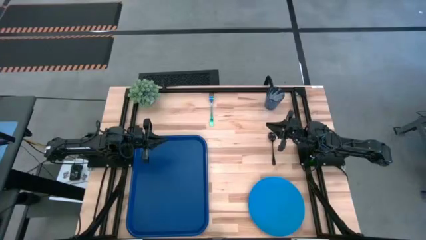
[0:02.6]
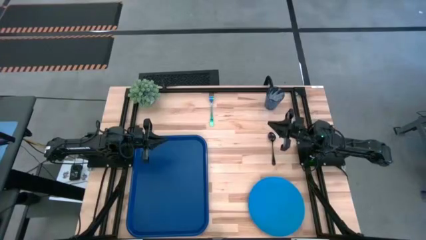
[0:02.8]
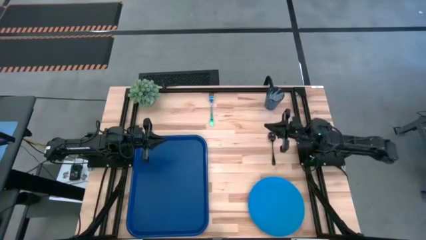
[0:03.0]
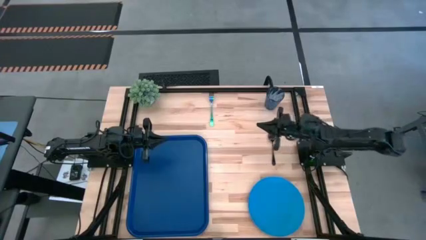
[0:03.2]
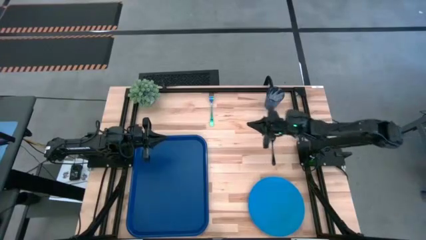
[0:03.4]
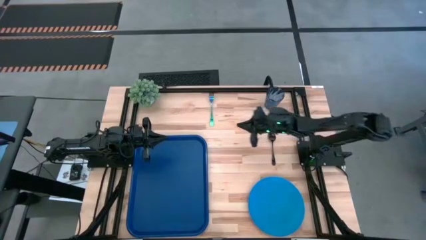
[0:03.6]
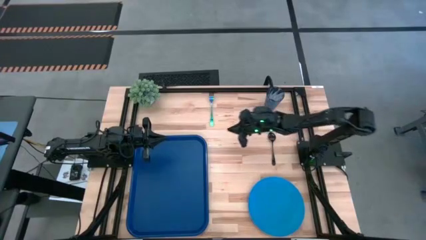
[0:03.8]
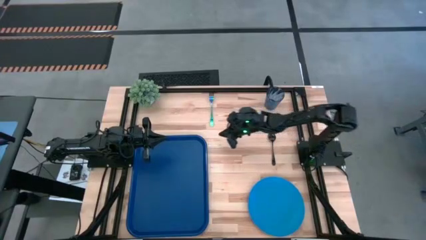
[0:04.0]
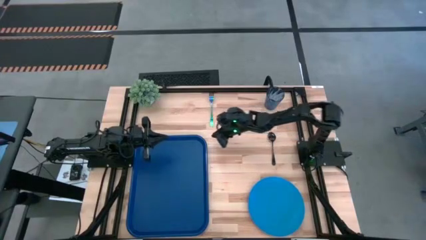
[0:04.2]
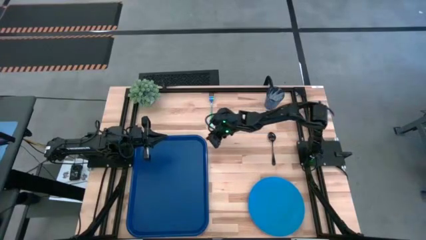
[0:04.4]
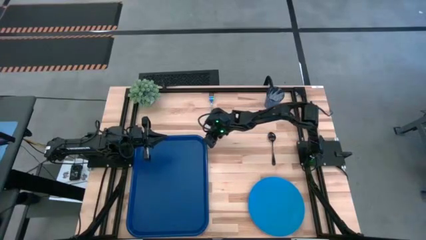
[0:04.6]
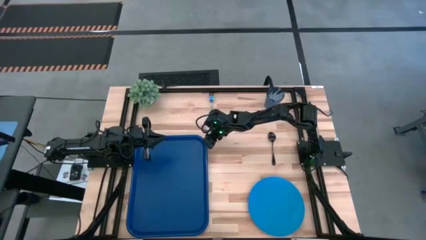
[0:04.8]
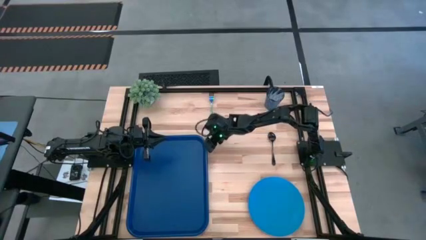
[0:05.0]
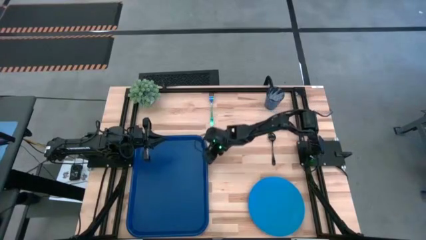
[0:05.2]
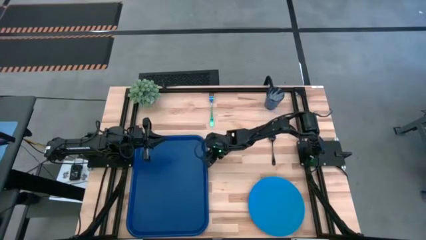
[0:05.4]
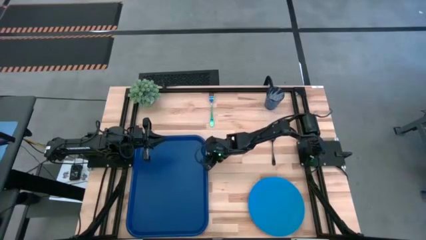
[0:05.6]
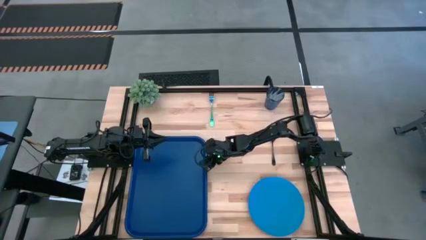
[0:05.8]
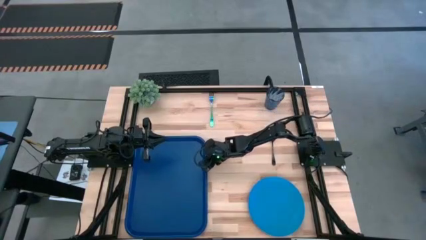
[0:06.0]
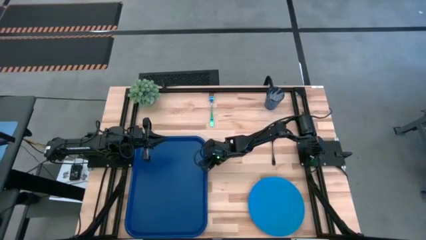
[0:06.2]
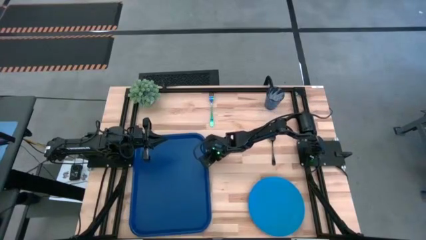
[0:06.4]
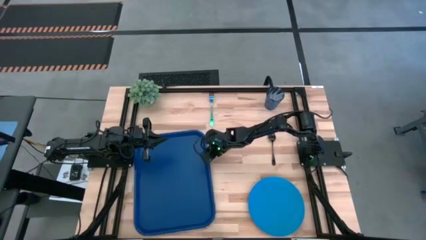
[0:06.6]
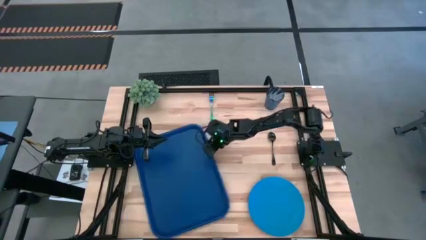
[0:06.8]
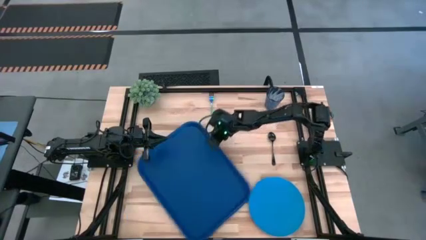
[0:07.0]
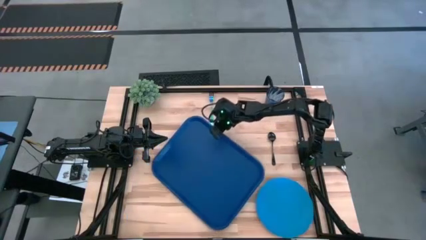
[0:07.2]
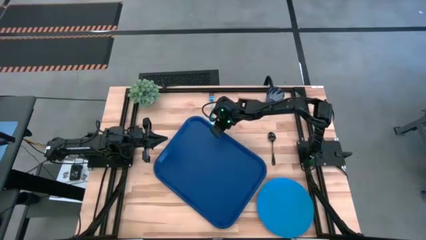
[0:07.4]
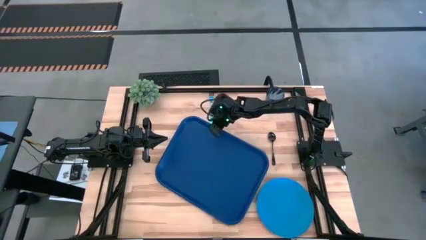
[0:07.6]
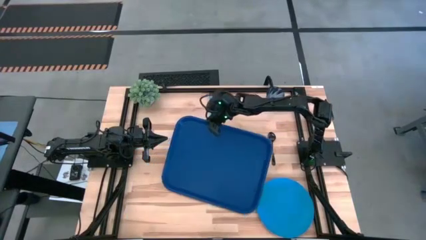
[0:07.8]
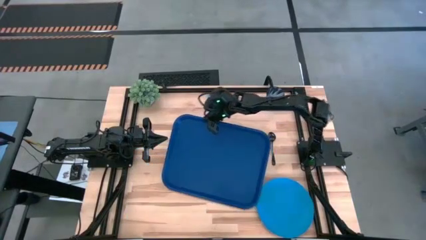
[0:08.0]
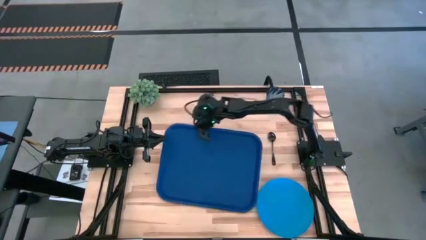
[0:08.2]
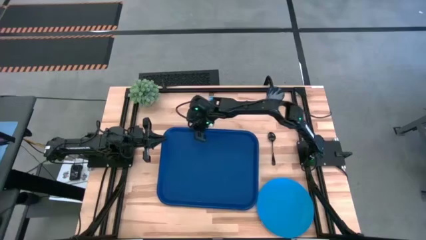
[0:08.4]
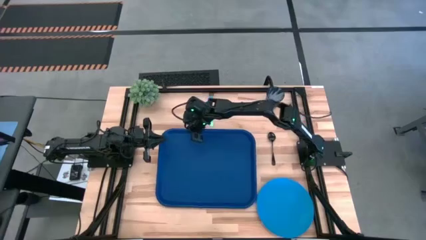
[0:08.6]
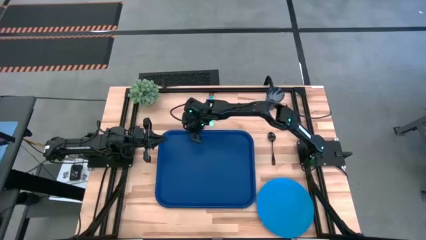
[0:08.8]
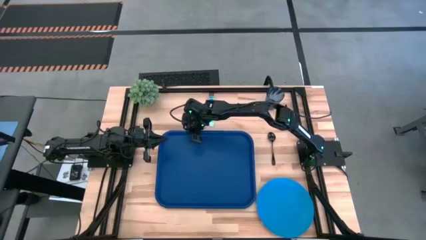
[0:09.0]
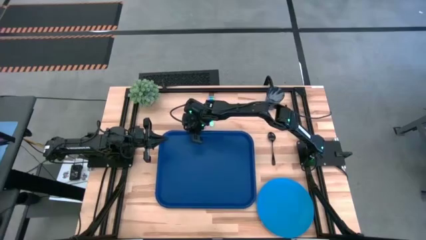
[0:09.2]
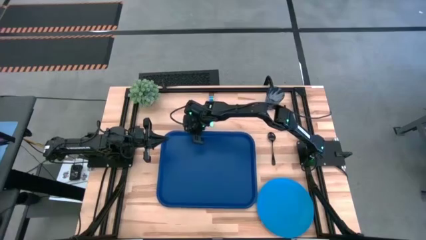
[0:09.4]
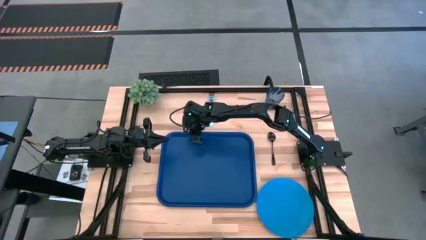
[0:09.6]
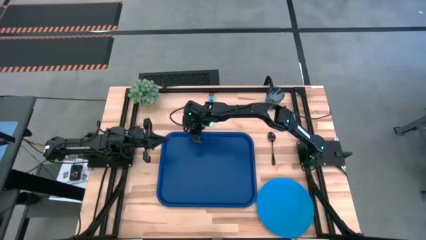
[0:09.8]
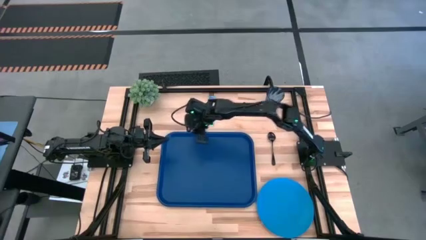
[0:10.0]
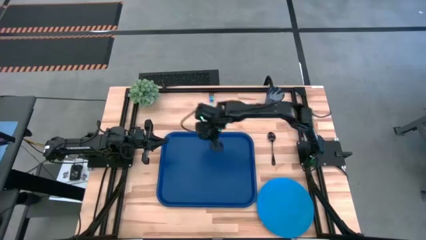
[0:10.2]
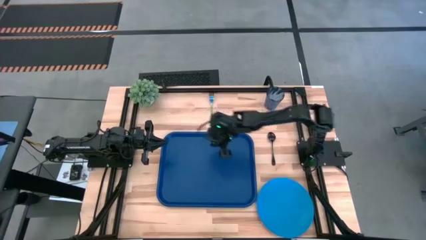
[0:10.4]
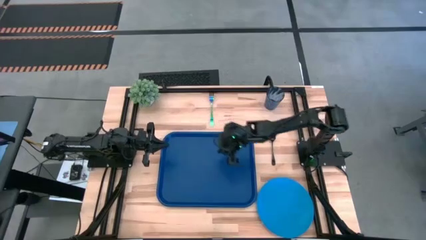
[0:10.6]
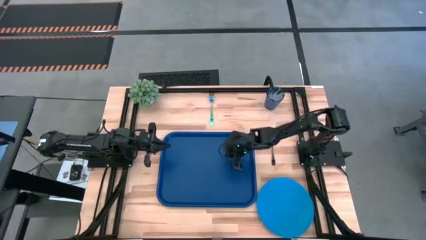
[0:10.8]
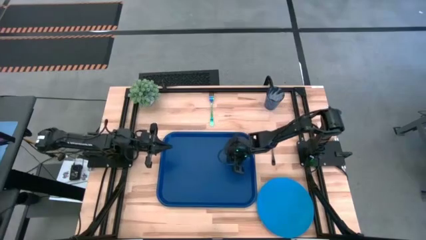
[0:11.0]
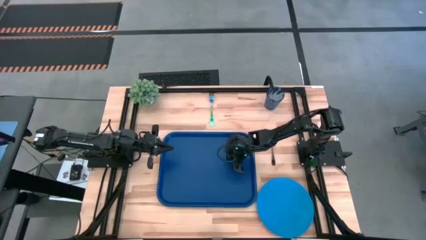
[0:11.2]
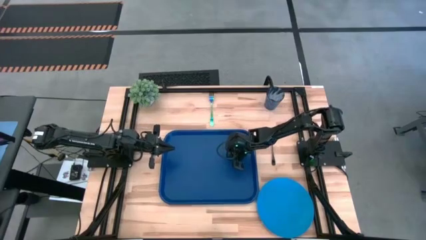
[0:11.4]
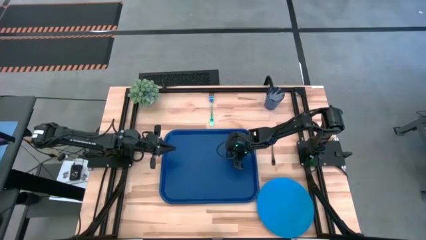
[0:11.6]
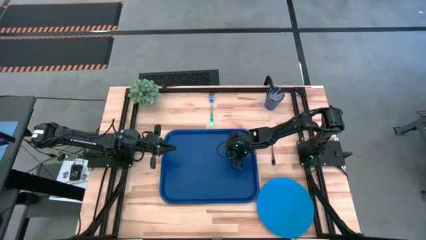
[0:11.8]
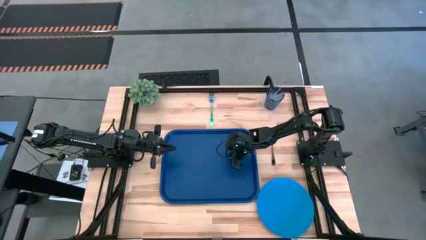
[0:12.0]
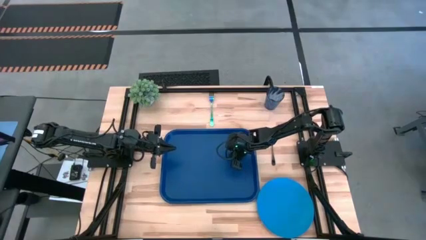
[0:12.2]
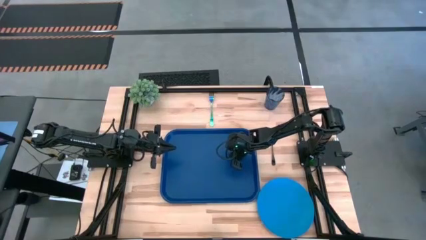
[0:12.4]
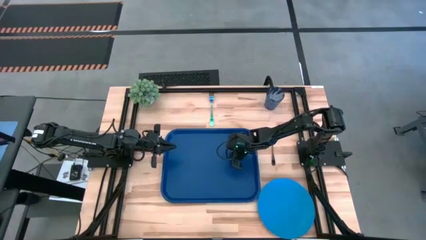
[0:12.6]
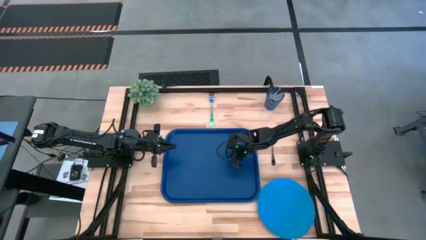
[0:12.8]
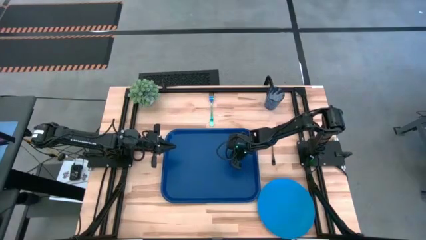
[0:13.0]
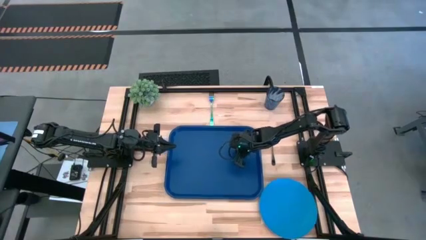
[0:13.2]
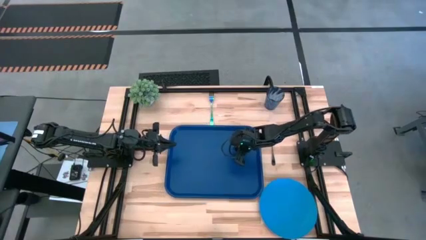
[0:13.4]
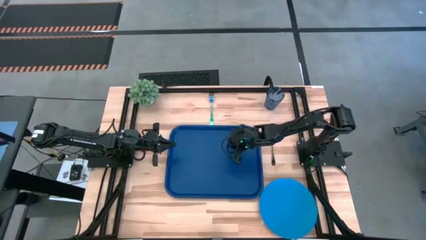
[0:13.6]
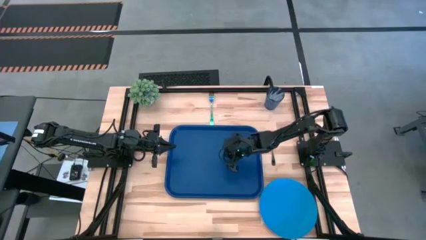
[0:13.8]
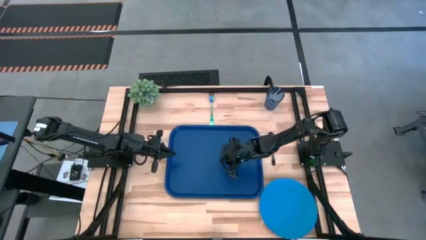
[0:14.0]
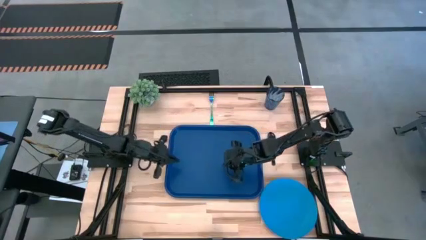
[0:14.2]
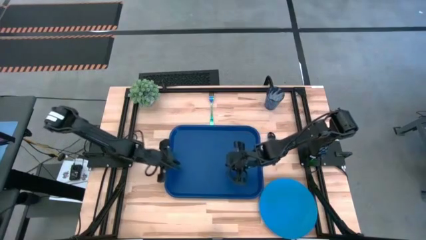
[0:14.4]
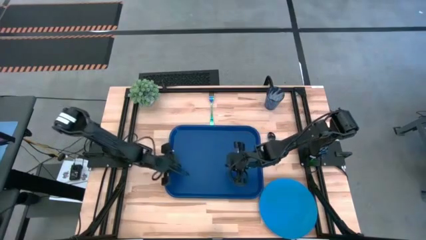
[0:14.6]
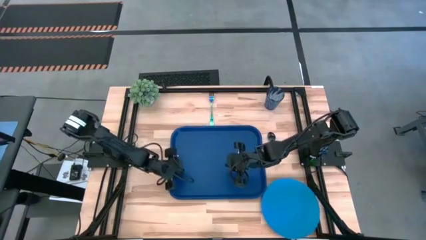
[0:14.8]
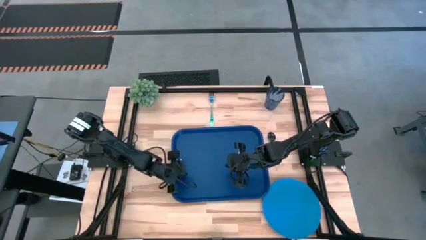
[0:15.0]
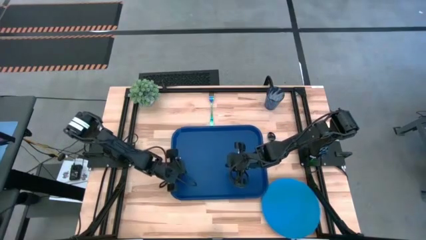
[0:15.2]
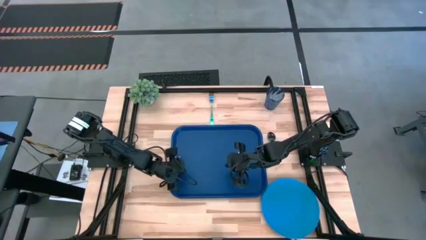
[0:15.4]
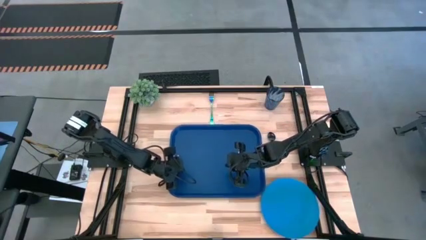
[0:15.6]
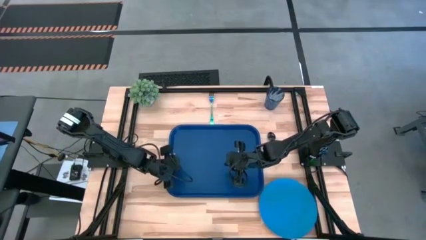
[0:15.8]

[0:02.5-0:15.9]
Task: Pick and place plate/cup/fork/spoon on tray
Move the blue tray to the middle
